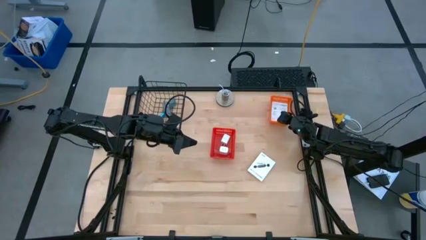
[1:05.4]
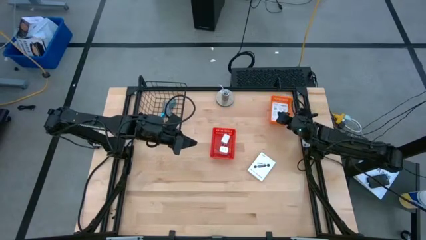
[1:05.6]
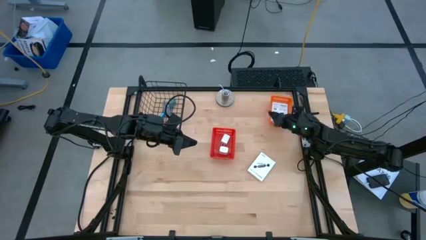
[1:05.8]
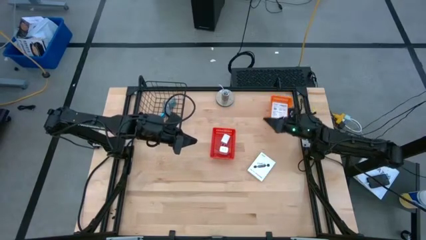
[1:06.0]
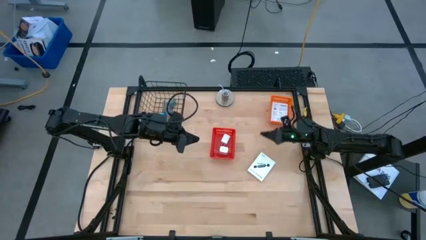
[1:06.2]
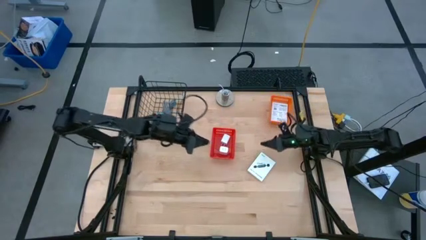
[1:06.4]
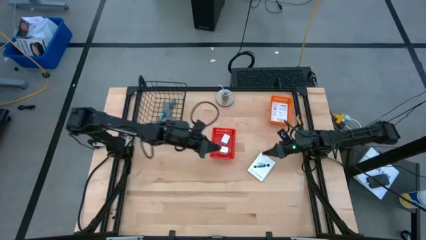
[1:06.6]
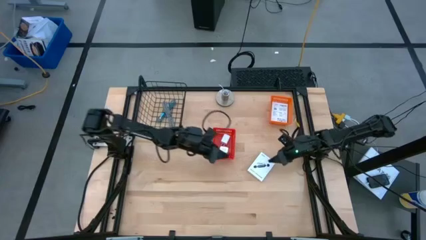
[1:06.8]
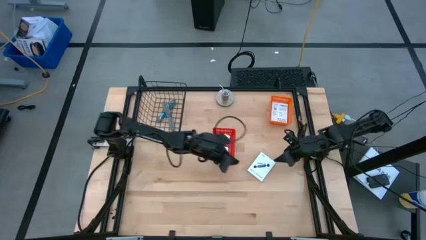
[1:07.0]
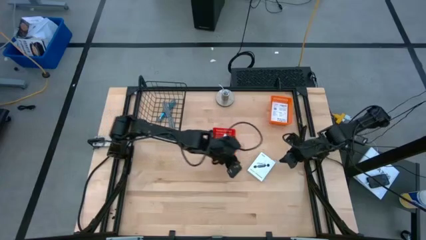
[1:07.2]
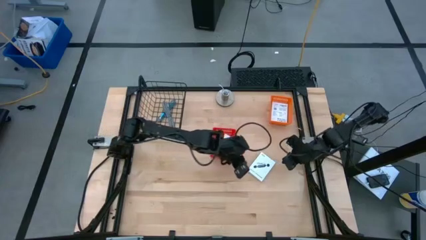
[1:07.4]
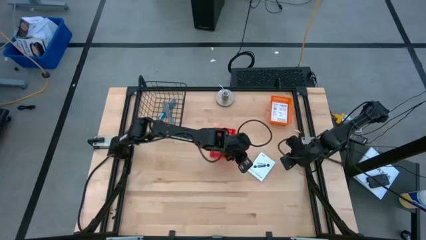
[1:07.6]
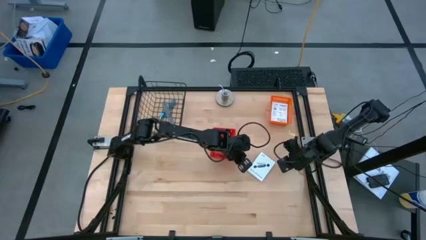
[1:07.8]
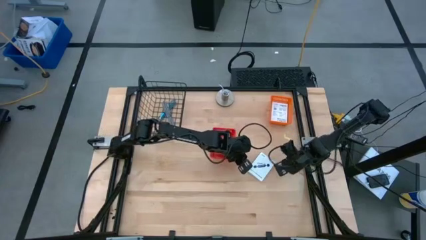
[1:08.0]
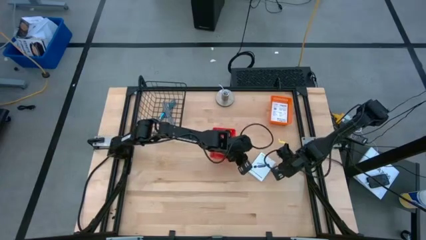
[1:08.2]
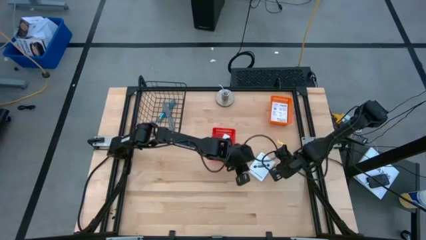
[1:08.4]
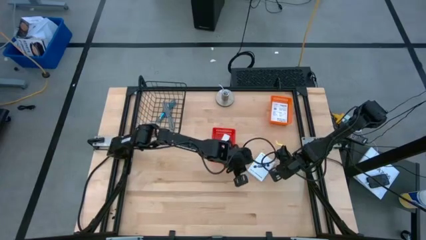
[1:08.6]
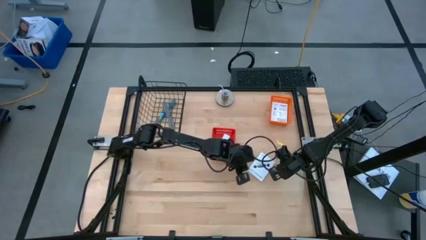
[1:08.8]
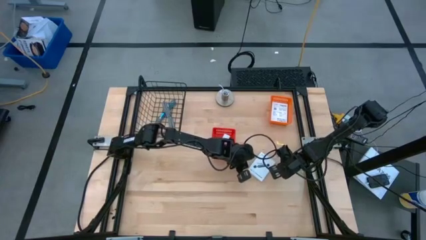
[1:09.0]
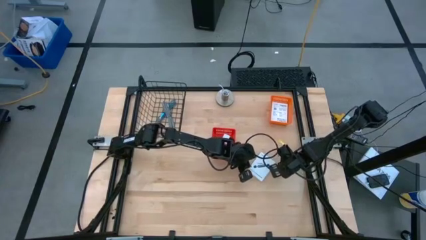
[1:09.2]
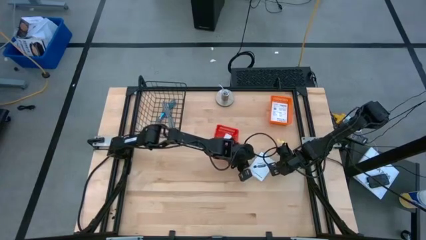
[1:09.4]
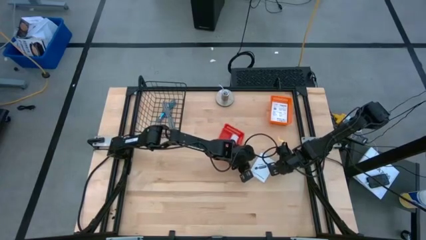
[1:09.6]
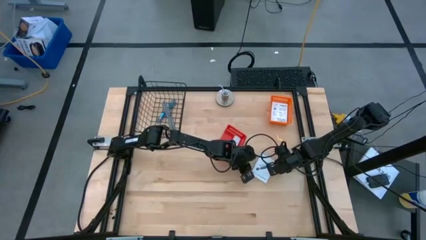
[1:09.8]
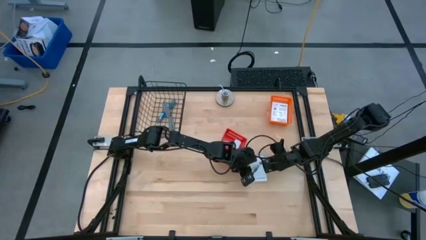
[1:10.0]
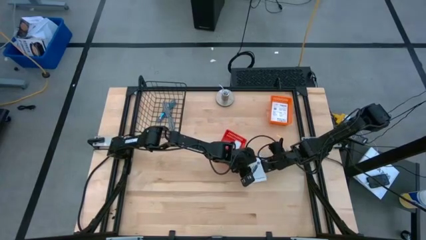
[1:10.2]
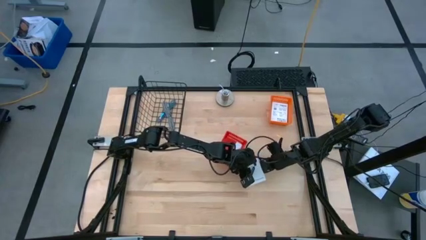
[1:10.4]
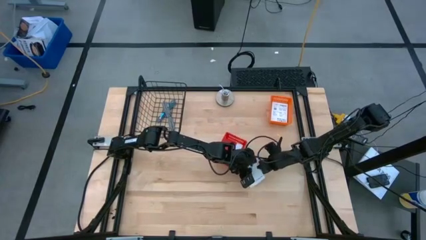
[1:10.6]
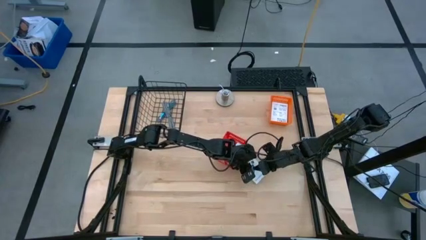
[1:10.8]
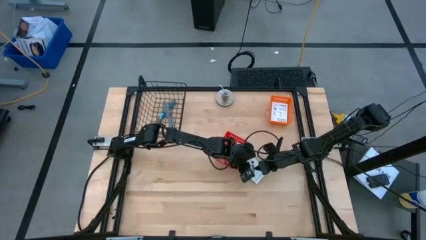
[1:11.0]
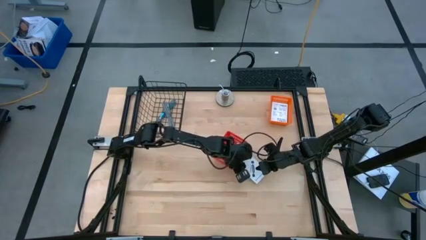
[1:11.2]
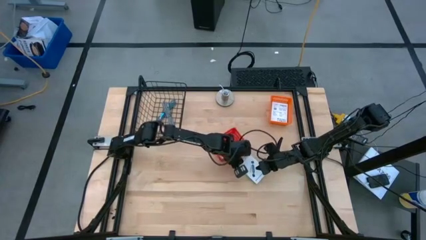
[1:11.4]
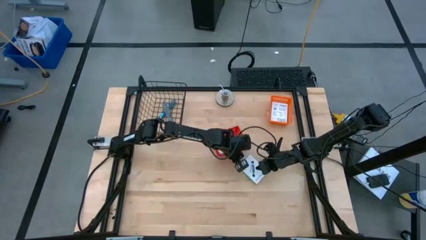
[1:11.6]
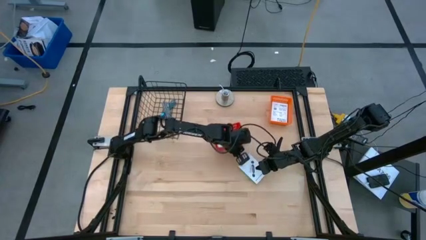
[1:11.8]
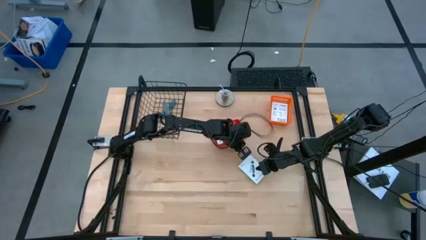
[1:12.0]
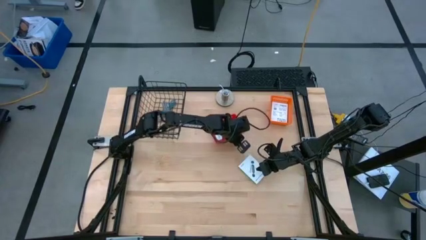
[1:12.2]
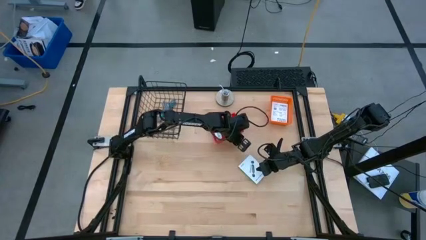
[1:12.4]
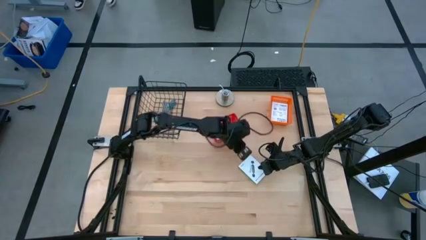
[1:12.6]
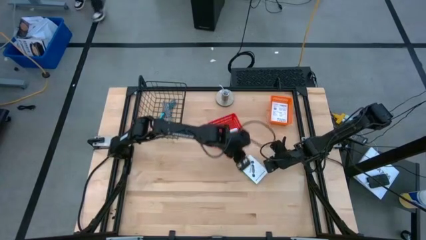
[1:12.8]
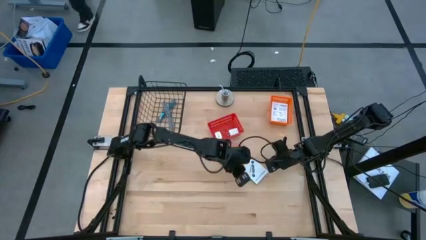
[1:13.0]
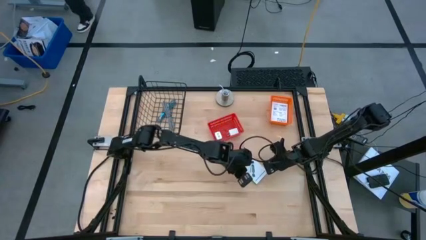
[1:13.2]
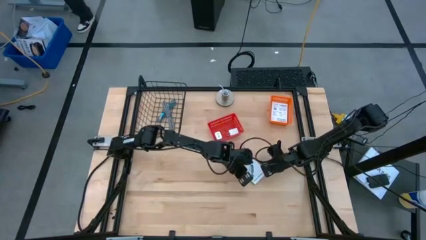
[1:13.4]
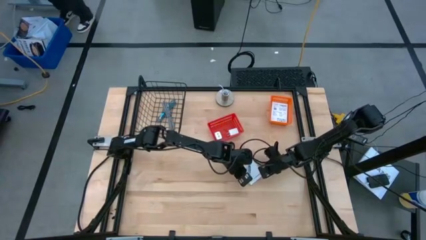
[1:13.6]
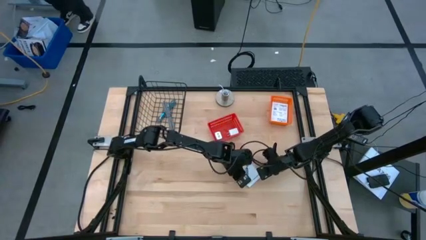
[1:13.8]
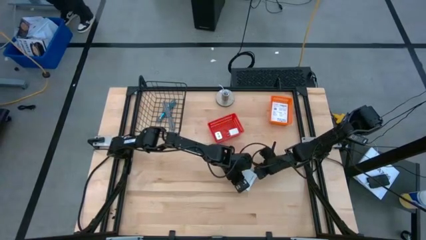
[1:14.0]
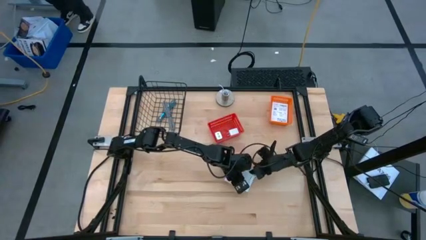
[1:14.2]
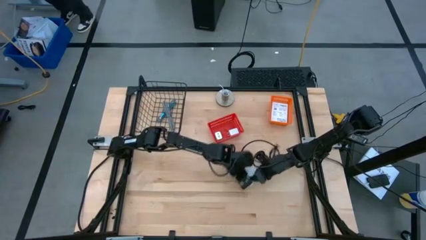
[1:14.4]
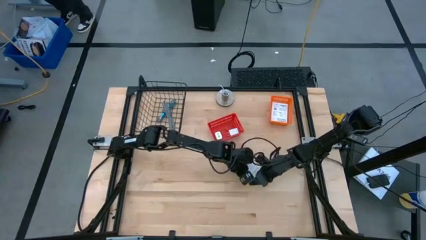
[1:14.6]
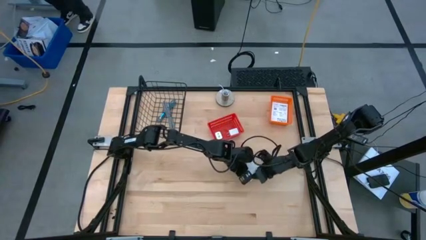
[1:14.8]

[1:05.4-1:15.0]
Task: Pick and place items into bin
Put the white card reader box into the orange bin

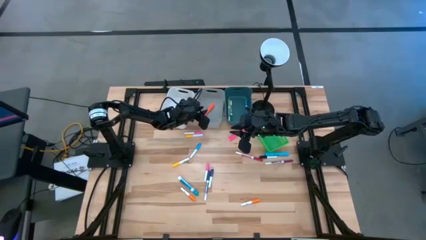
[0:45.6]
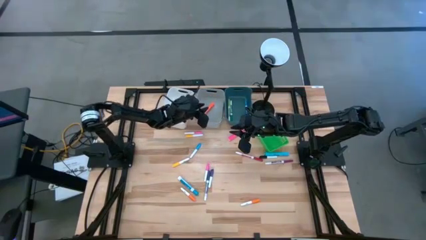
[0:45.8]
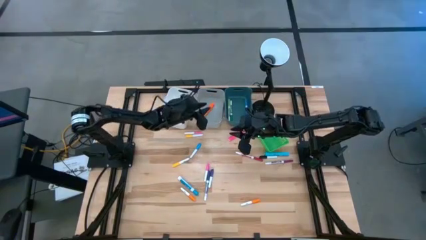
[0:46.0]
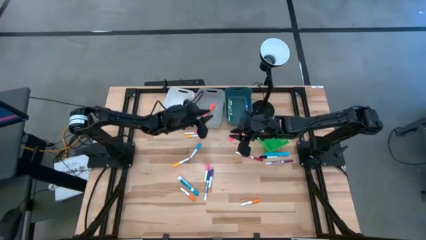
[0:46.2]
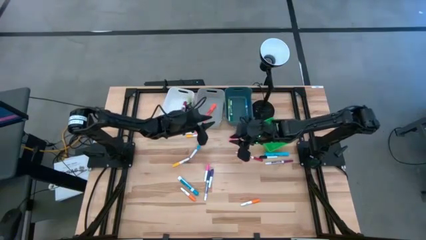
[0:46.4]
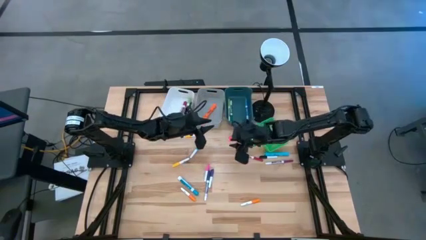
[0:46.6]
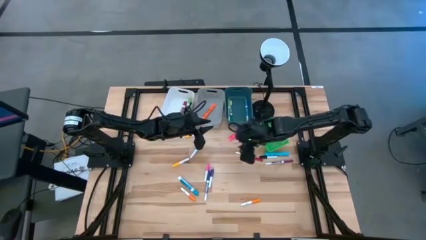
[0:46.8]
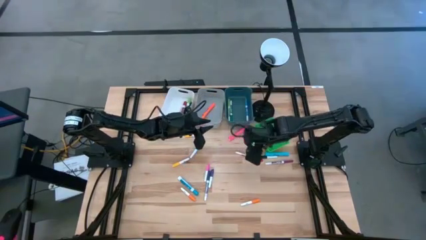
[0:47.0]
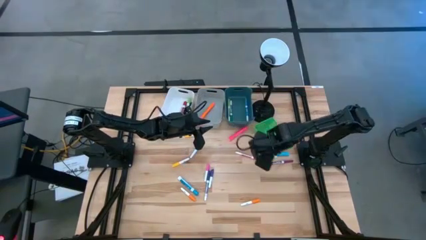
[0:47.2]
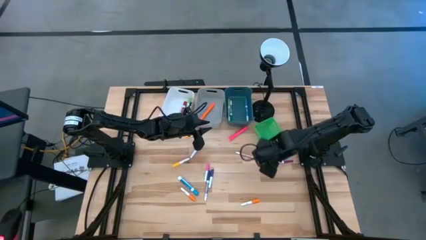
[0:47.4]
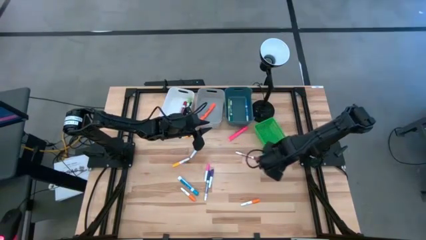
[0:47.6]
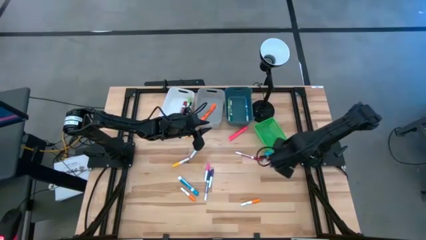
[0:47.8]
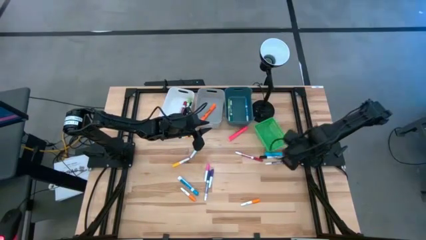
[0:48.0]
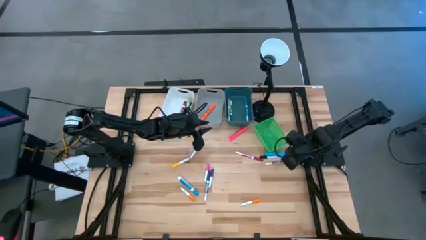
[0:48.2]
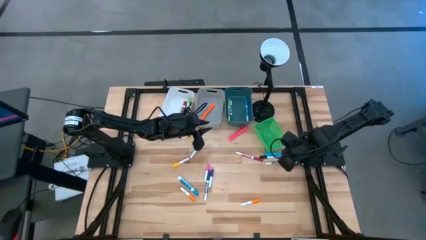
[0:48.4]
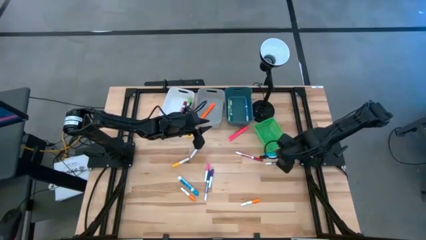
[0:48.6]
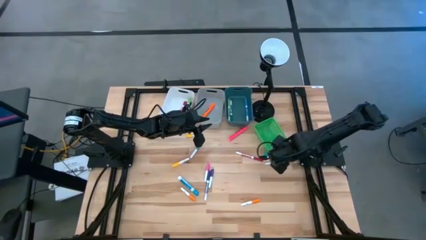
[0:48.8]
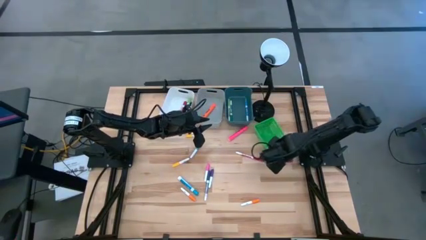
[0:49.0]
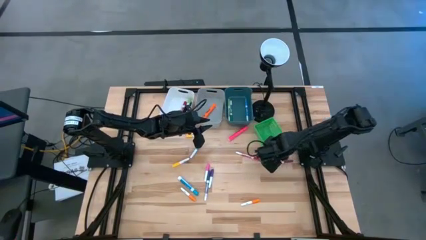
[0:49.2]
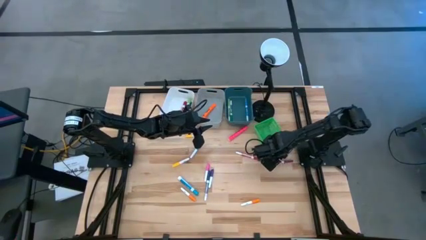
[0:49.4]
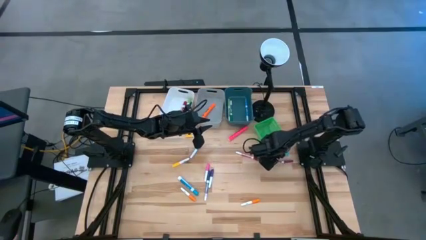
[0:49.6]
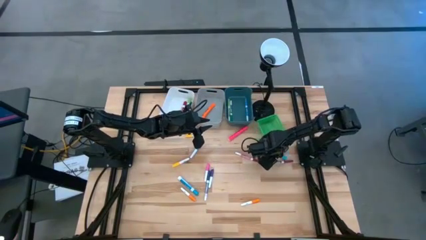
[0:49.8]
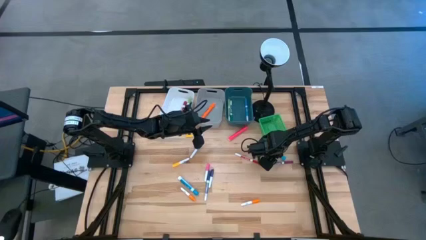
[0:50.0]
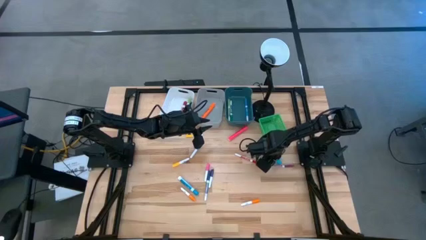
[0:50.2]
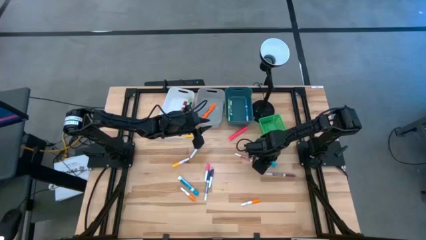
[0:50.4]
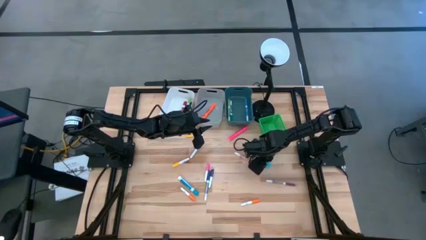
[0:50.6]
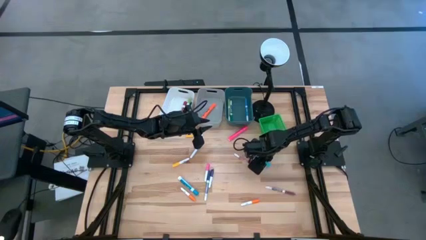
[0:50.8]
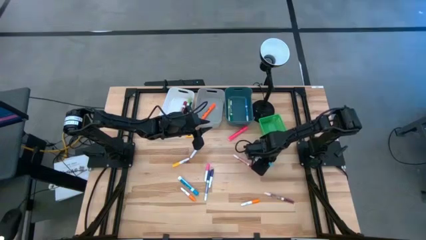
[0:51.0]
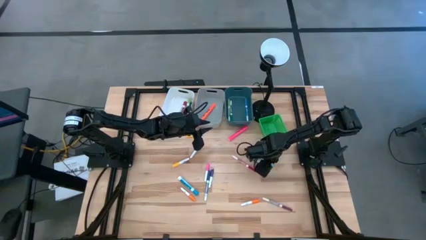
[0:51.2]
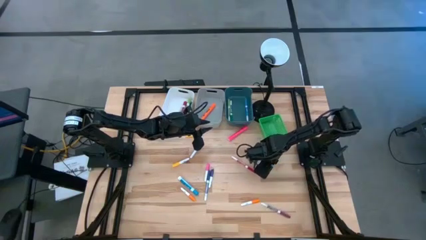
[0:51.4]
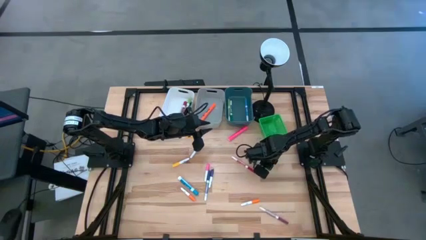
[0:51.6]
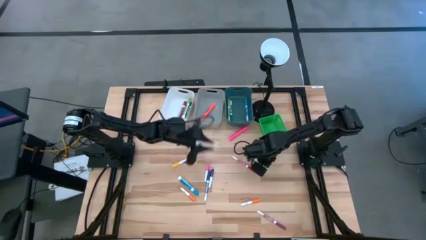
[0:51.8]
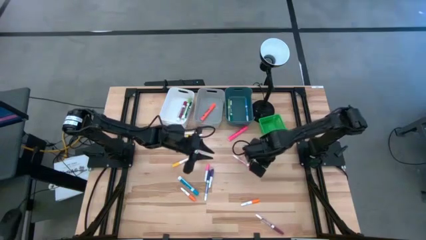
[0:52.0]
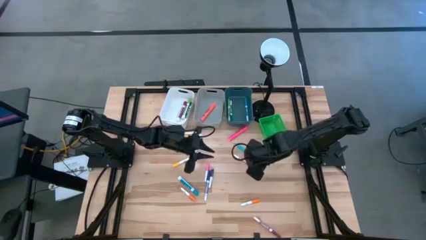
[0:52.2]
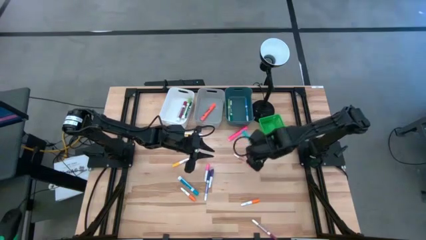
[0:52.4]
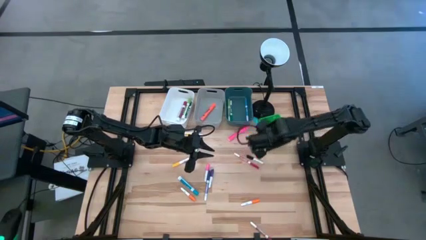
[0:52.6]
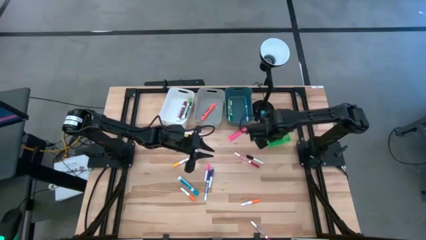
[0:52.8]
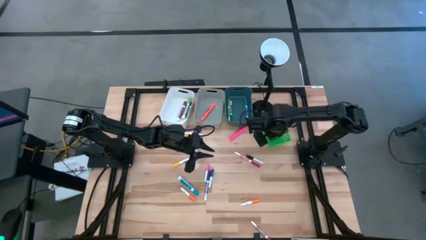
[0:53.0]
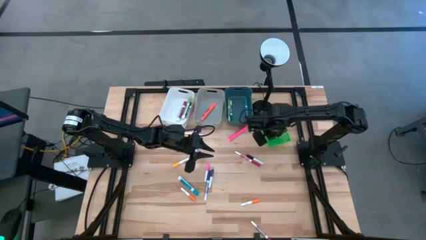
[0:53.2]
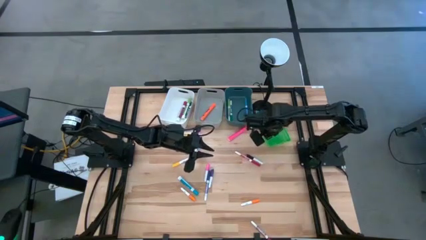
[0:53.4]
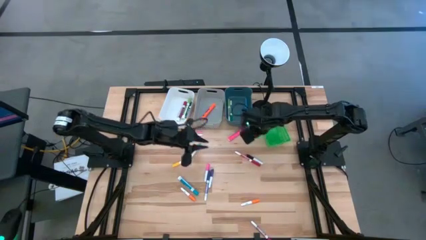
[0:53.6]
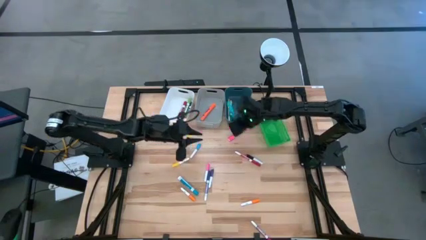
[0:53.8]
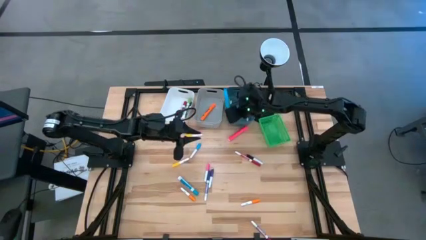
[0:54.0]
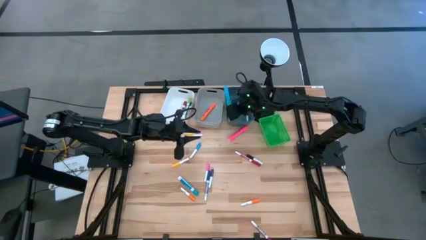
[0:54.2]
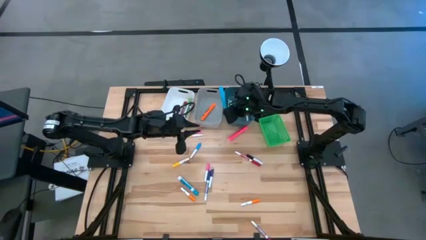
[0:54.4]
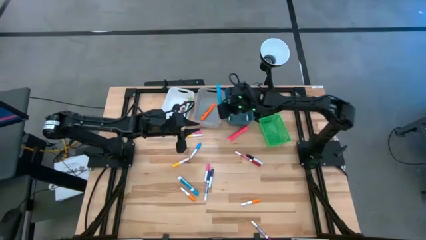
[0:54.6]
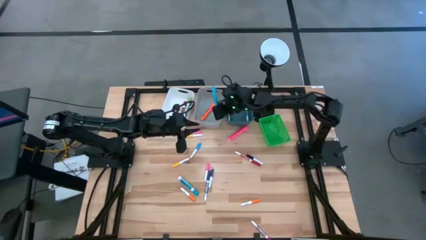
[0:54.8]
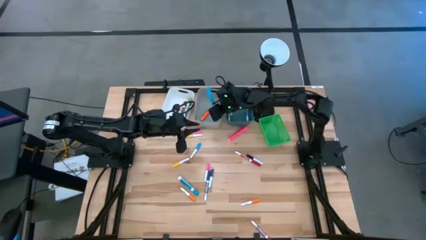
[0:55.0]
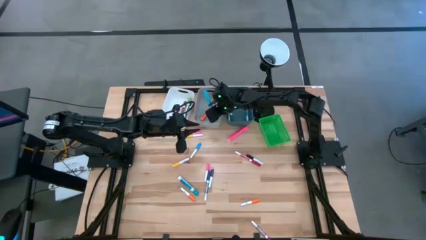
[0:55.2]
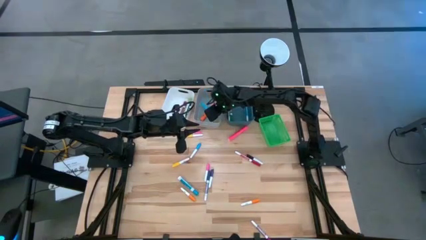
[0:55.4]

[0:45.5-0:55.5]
Task: Pick & Place Markers
Put the blue highlighter pen into the gray bin
